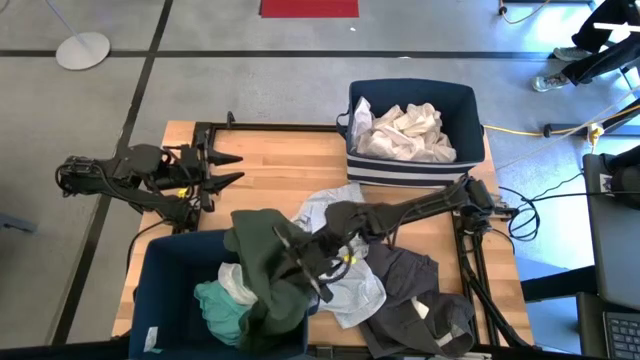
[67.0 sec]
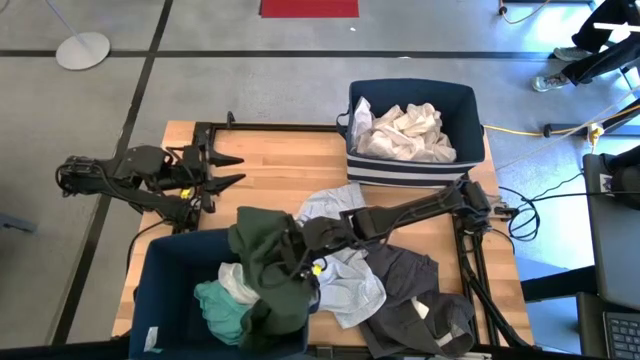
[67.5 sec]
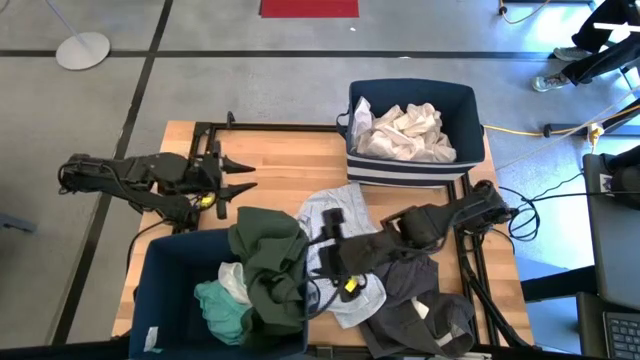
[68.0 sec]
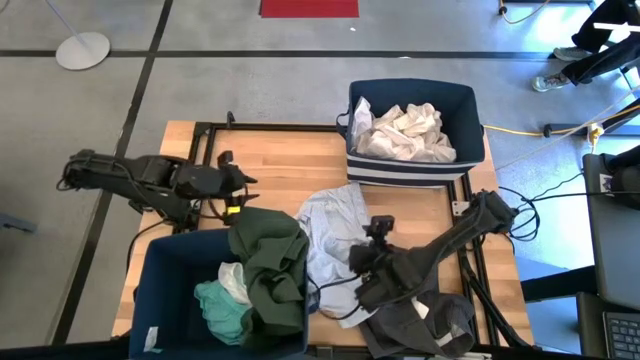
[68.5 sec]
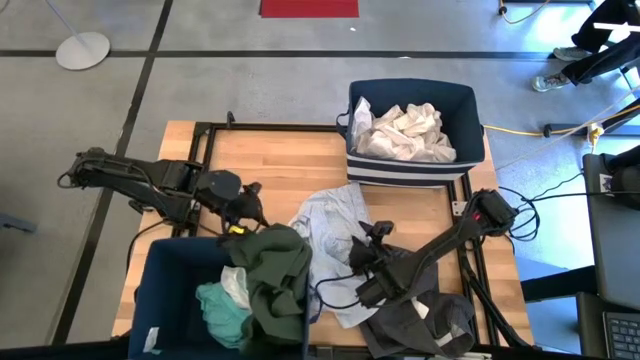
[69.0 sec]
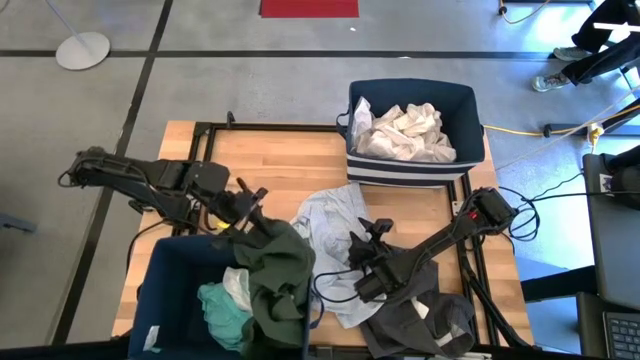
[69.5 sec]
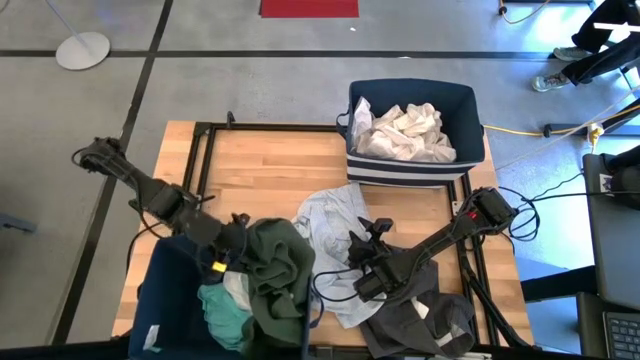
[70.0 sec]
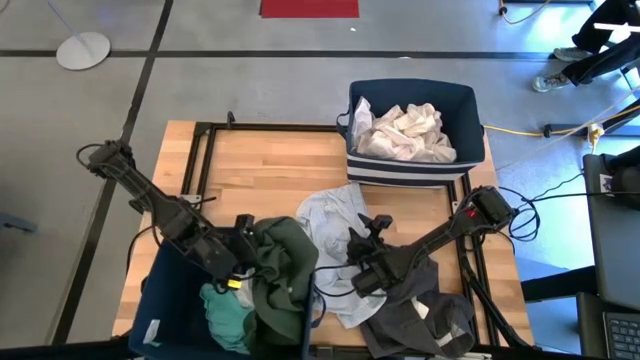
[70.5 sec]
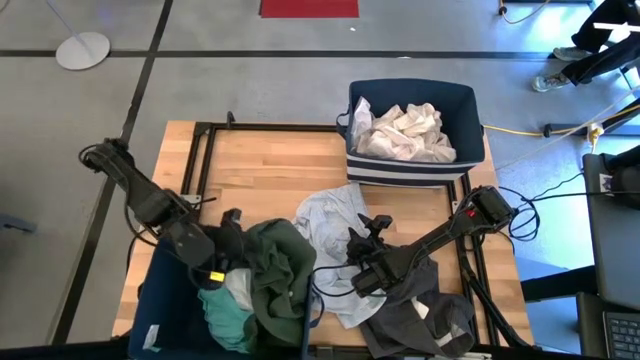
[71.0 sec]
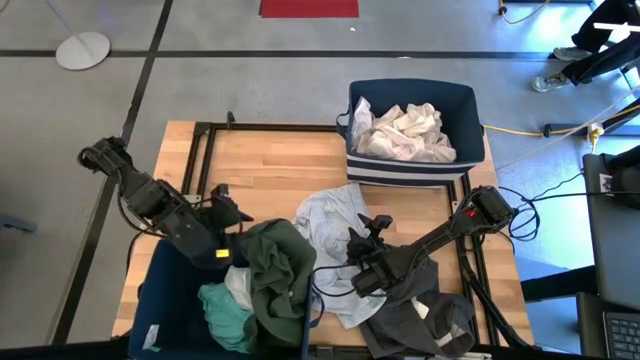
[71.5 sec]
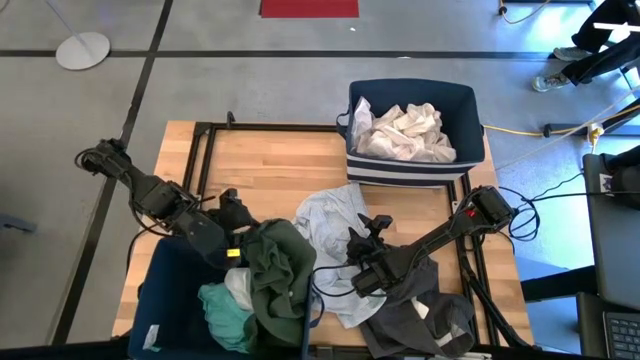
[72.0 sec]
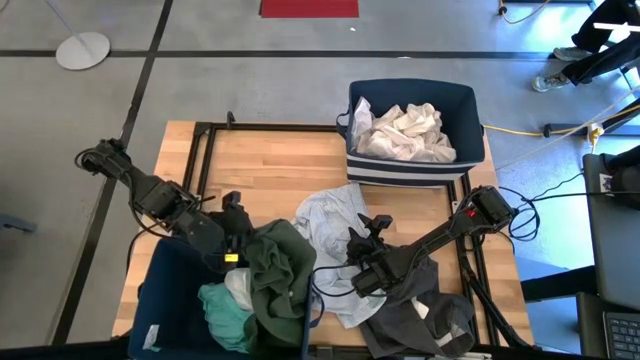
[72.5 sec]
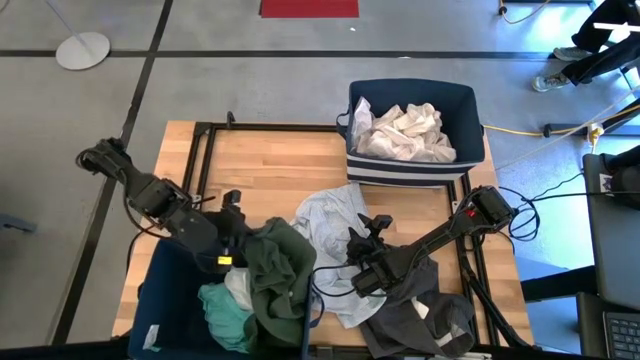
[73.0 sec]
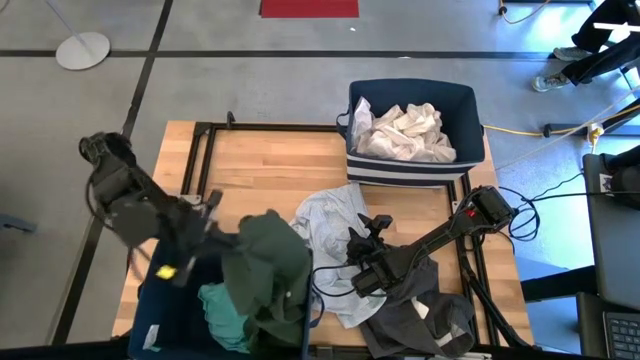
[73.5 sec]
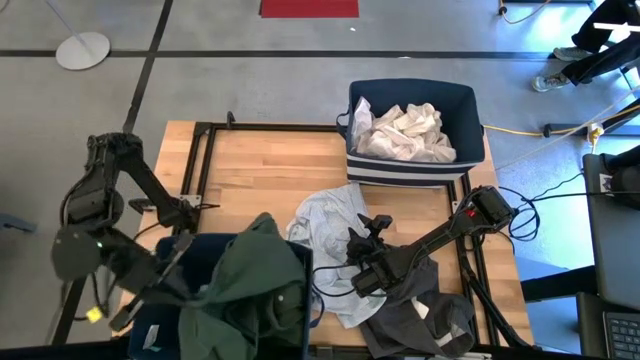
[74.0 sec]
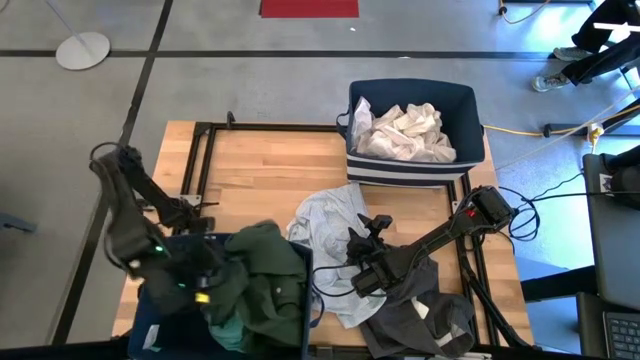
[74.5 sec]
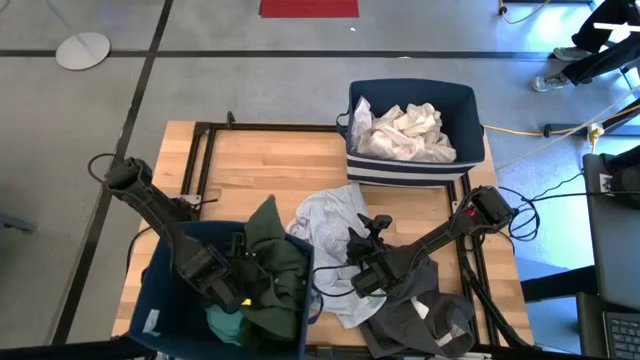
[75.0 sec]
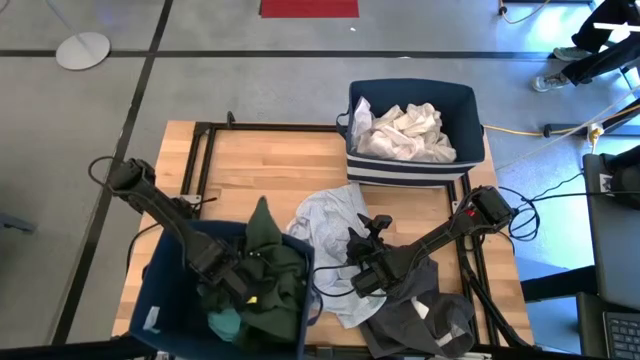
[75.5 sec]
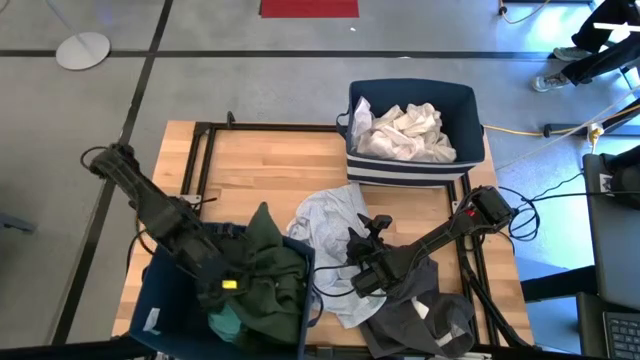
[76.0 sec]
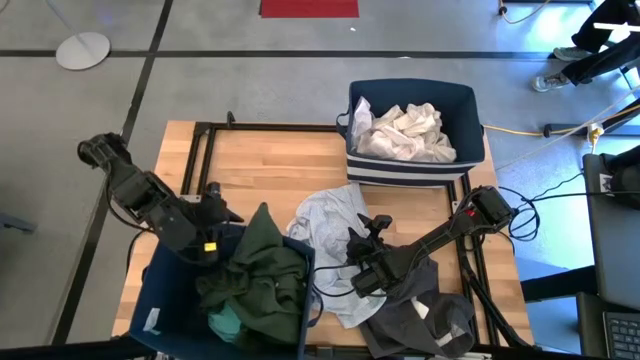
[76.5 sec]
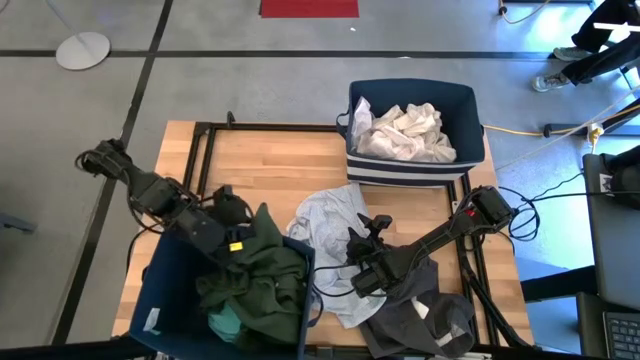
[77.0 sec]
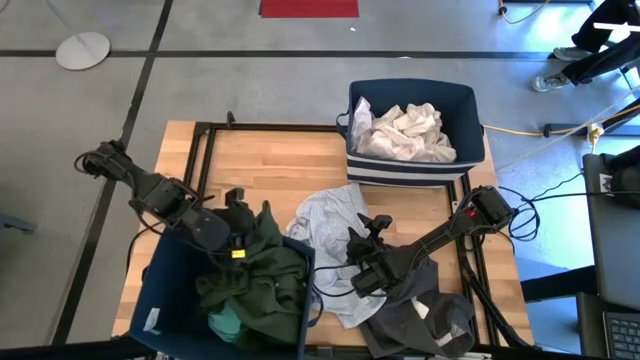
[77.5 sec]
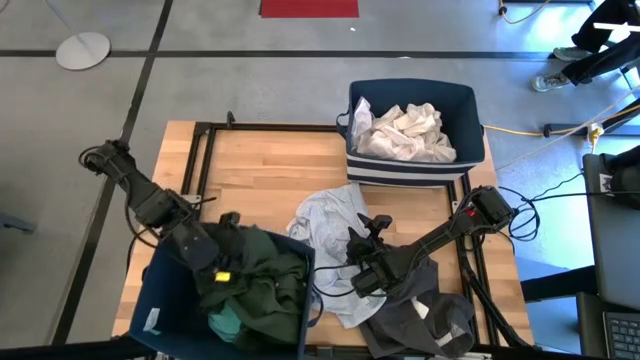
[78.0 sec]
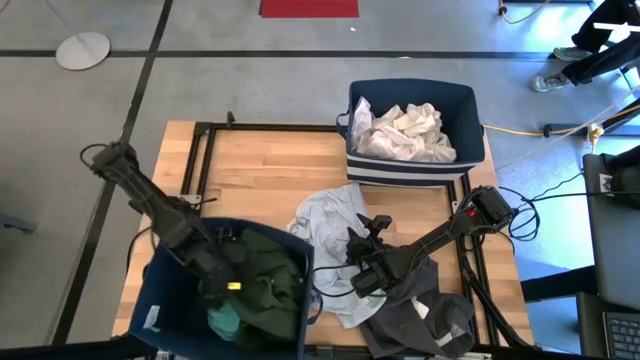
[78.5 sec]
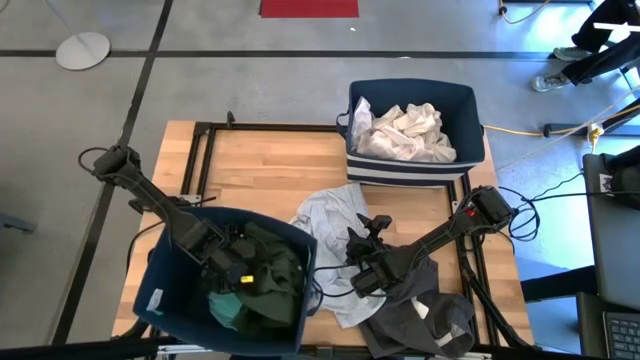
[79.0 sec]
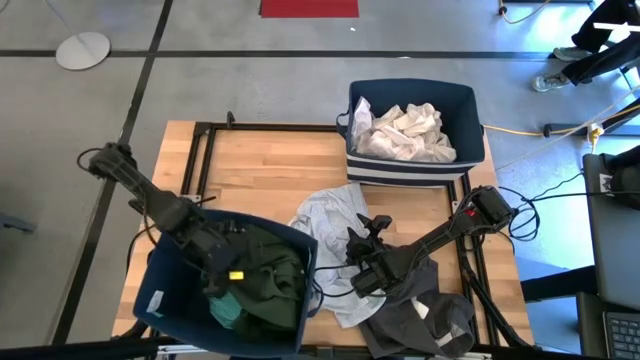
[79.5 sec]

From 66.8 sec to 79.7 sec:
Task: Sort clothes
Put the dark green polo shirt into the bottom laundry bin

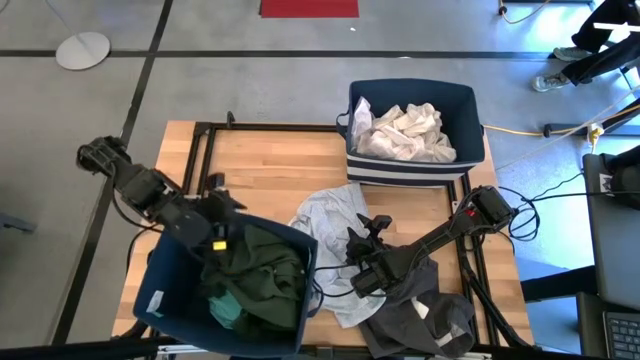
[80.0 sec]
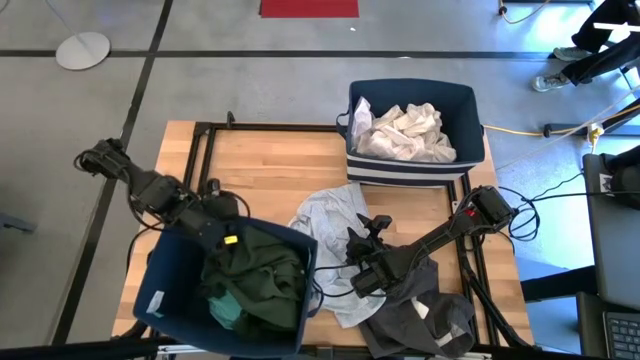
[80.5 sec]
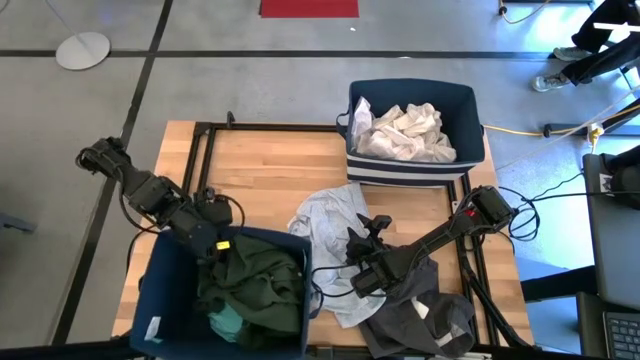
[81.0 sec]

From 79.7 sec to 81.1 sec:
Adjust the bottom laundry bin

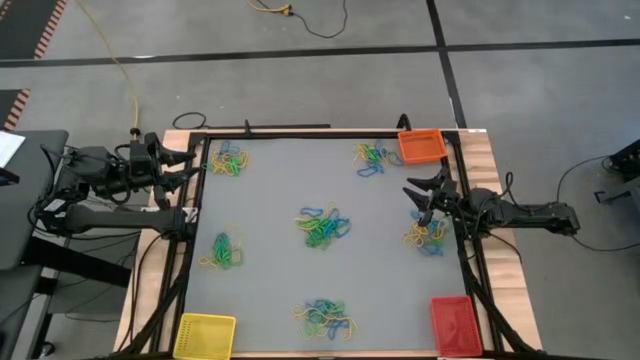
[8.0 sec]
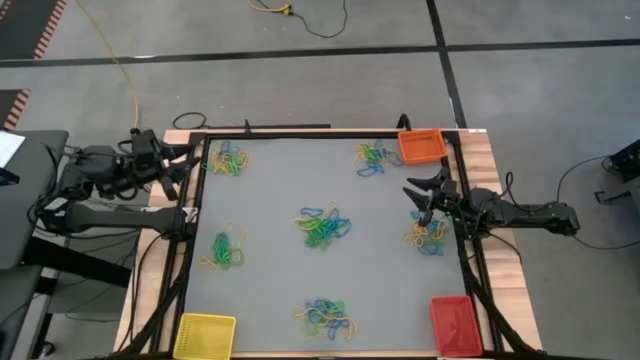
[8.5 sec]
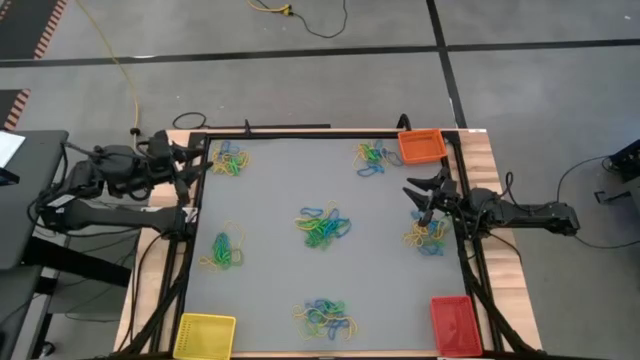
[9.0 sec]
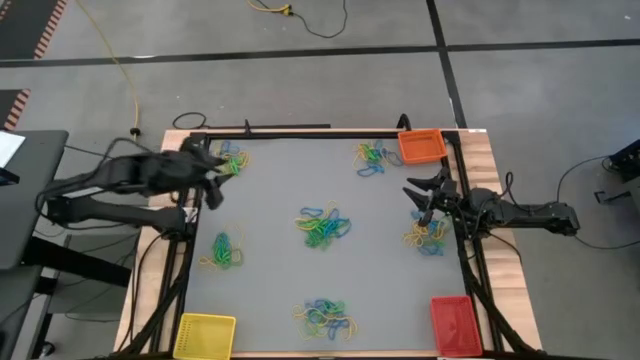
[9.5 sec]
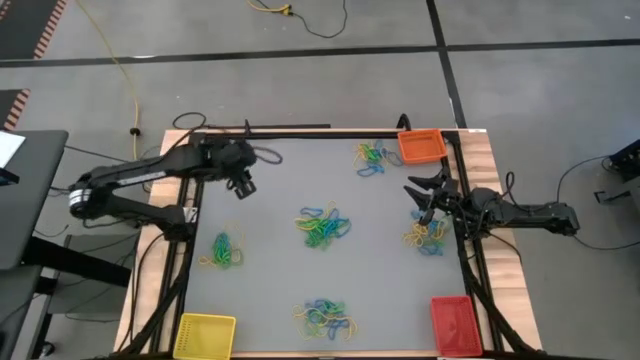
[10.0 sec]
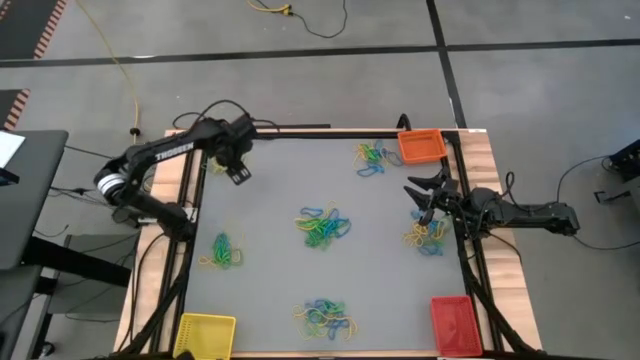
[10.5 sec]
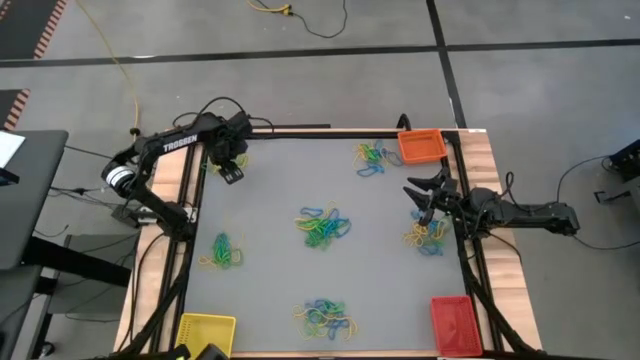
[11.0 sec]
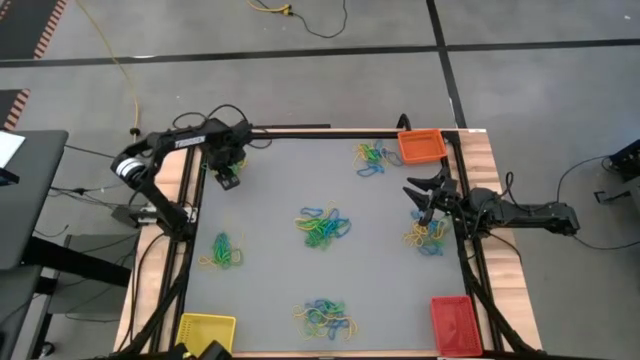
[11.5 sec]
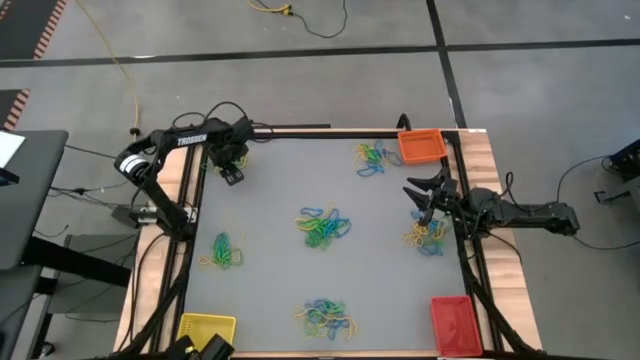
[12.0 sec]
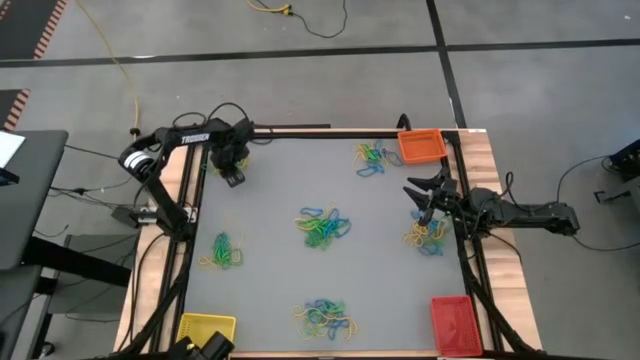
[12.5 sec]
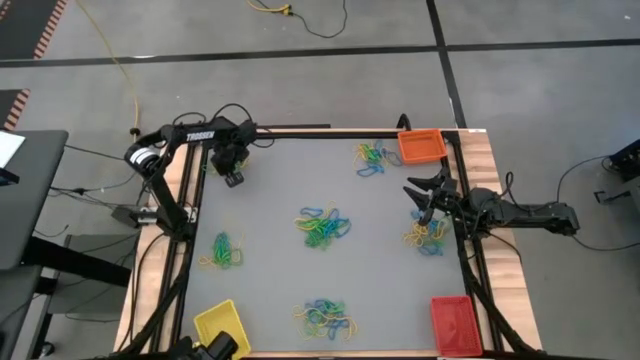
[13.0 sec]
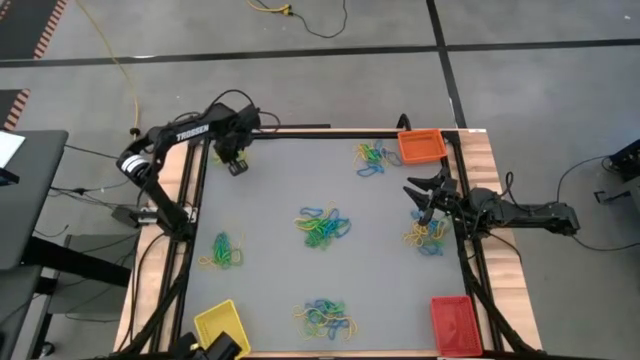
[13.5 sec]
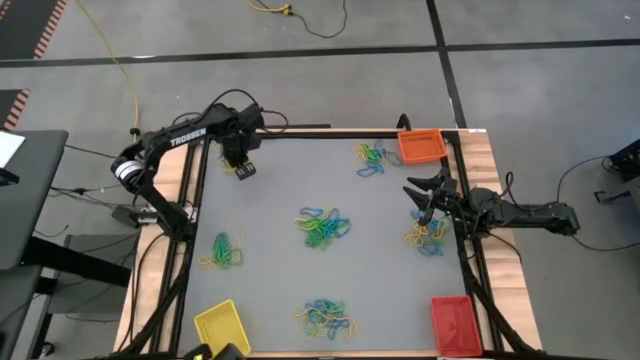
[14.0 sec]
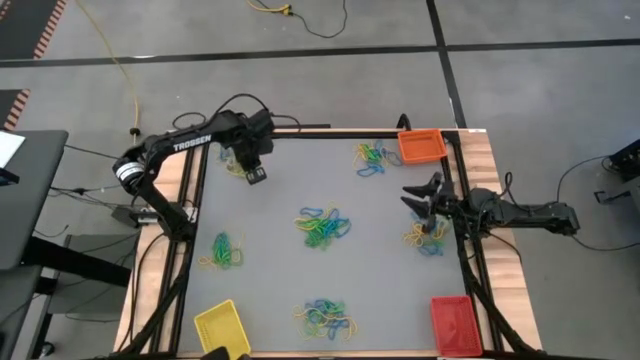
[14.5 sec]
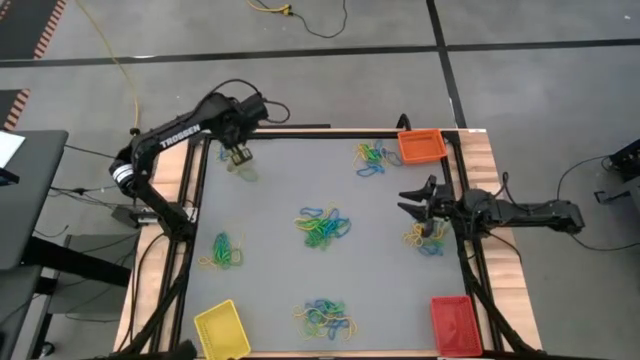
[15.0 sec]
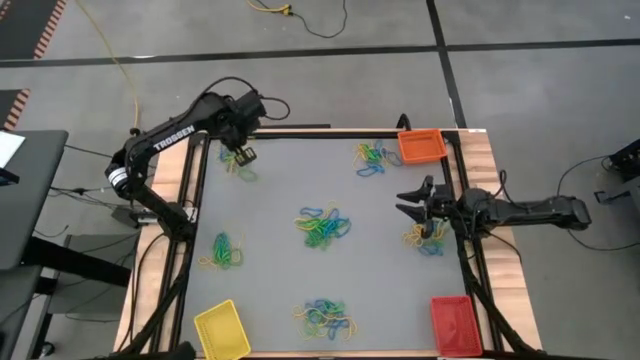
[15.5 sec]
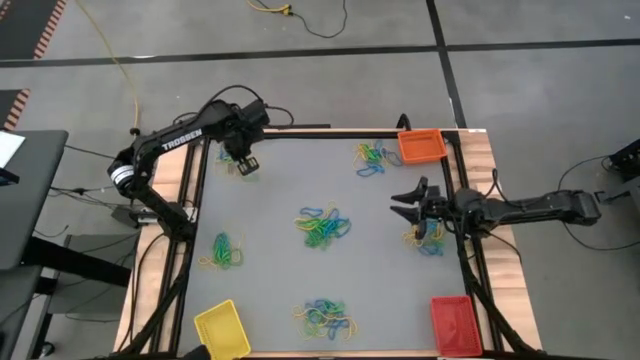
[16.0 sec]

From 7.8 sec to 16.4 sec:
Task: Sort rubber bands into baskets
Put the yellow rubber band into the yellow bin
